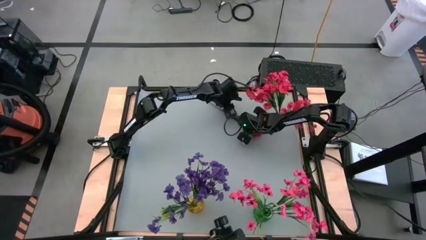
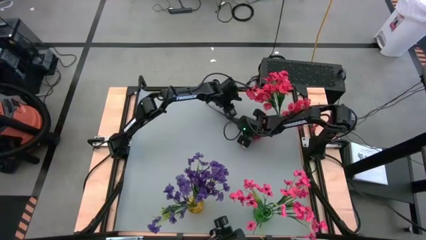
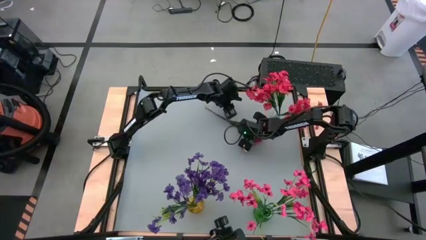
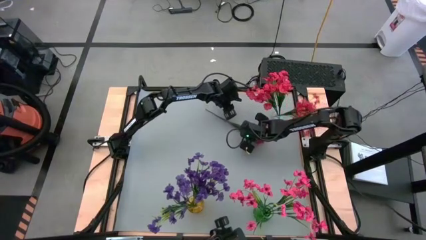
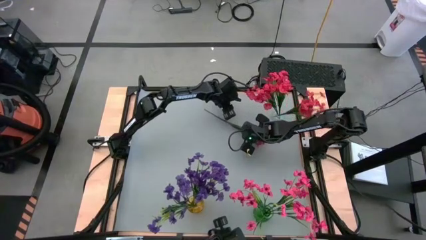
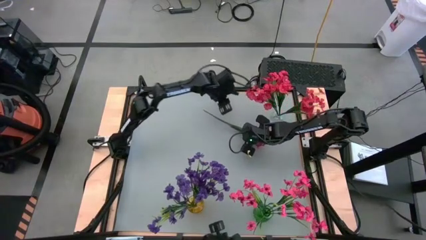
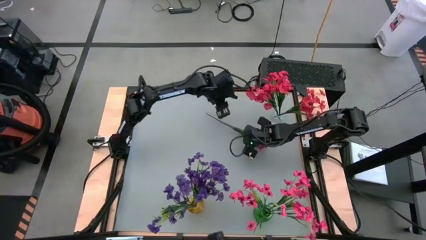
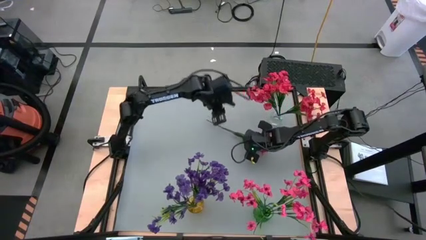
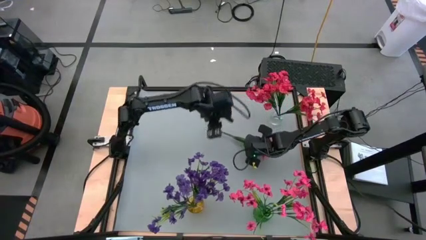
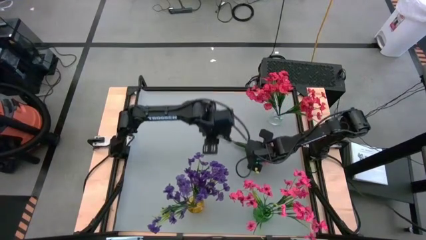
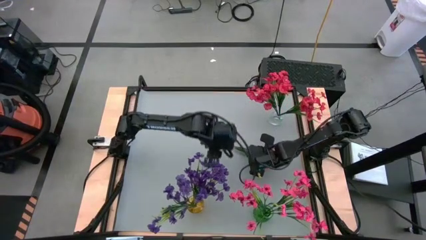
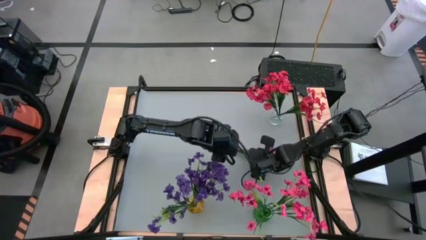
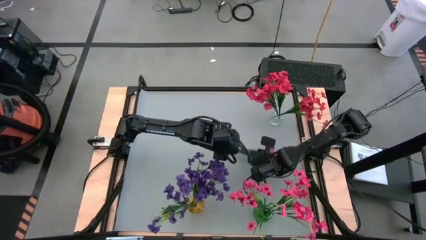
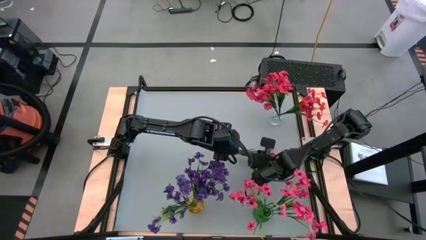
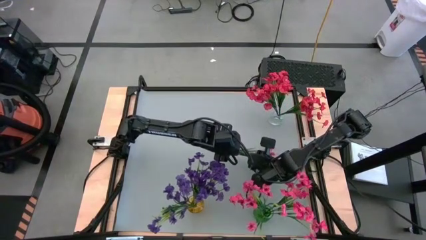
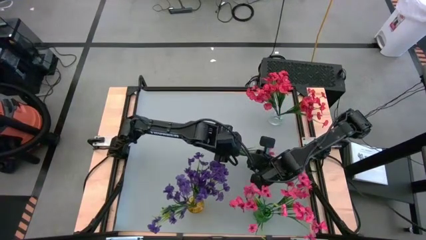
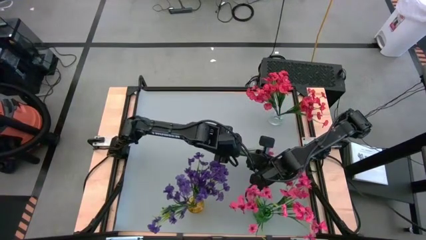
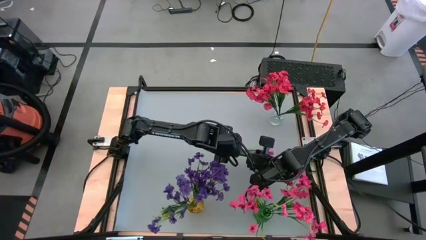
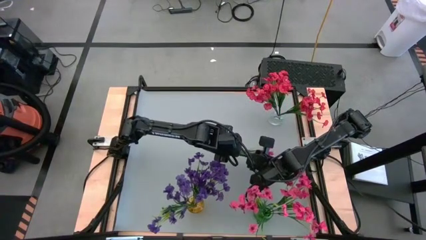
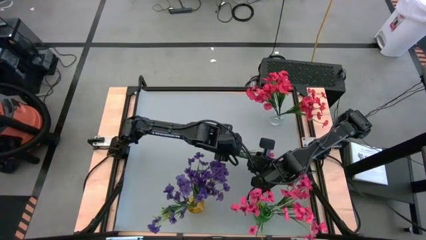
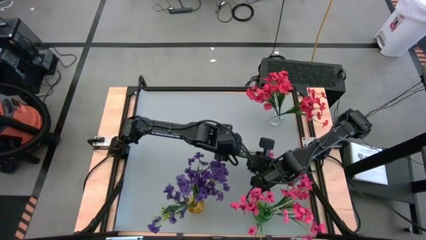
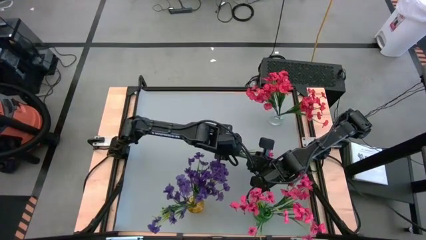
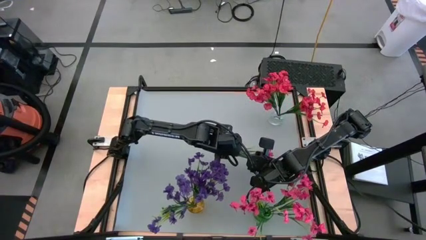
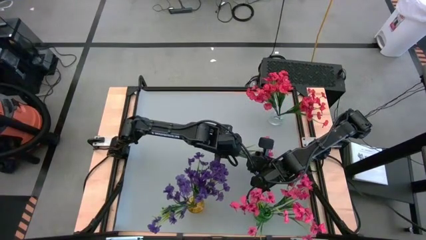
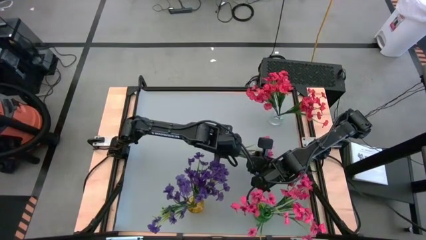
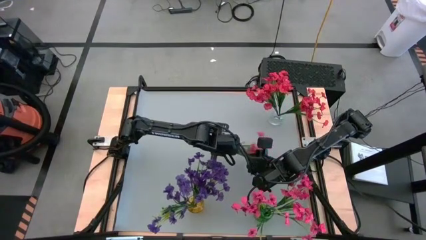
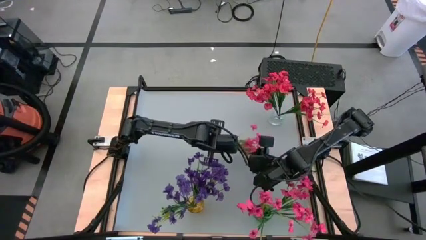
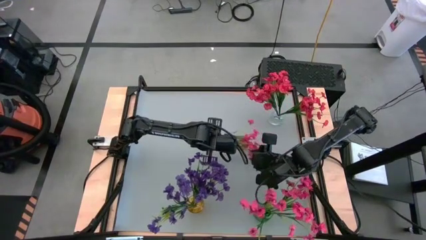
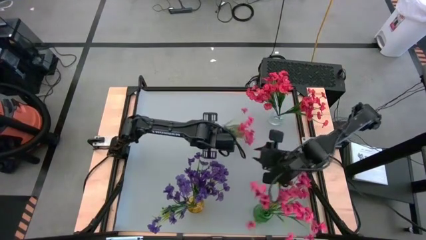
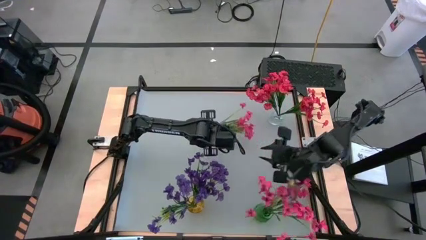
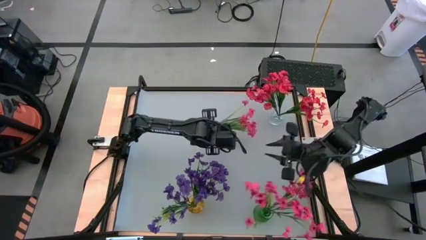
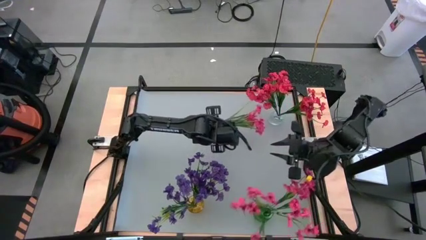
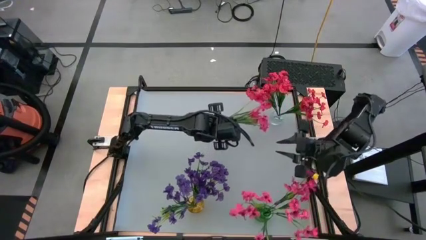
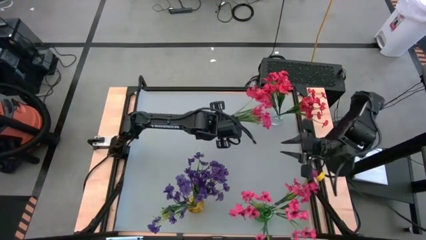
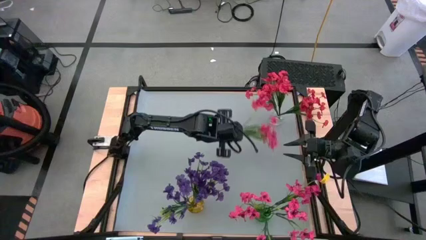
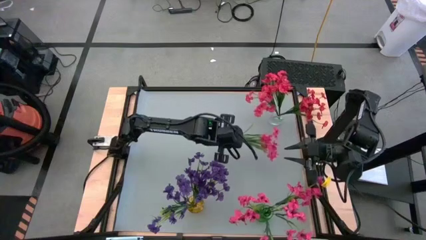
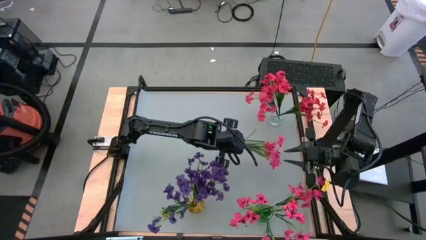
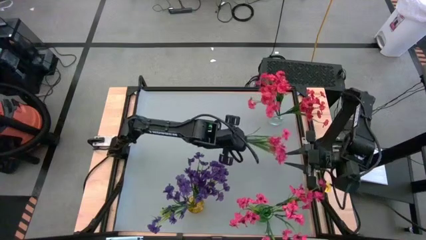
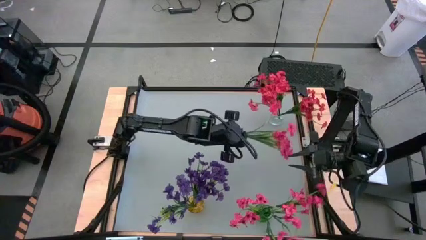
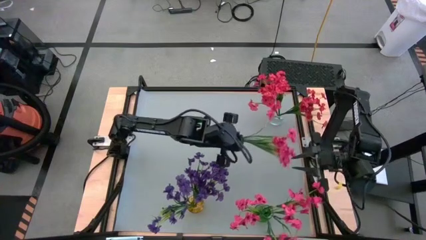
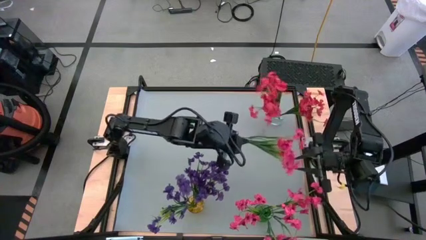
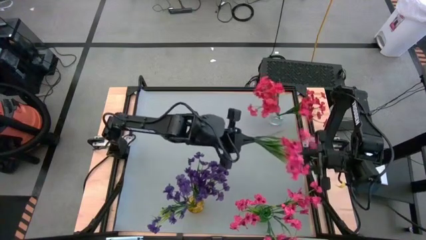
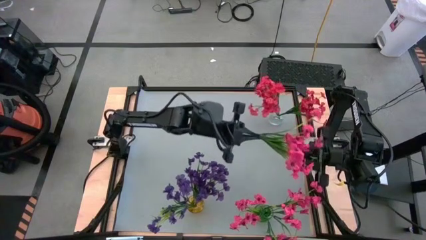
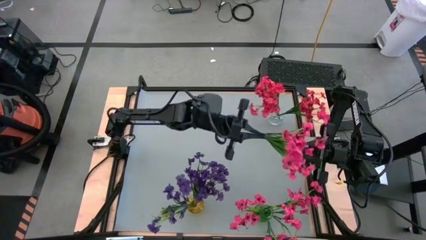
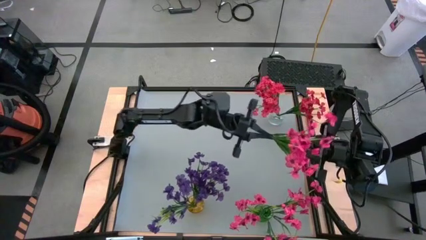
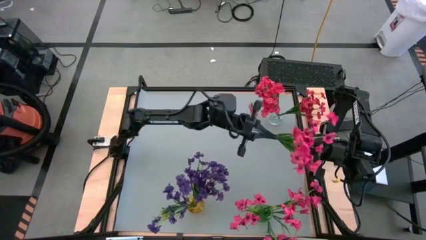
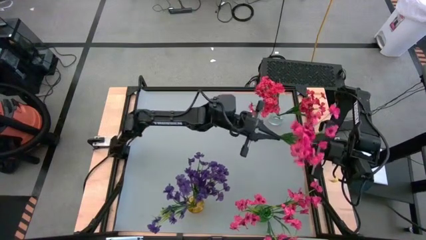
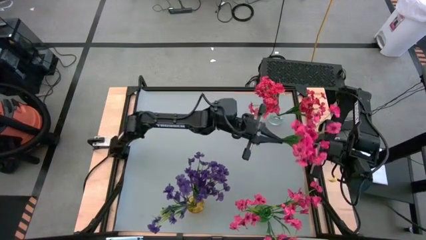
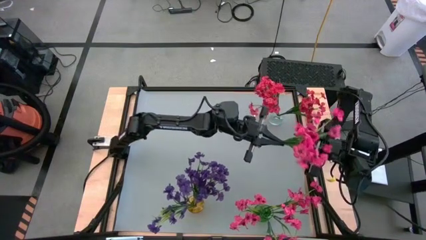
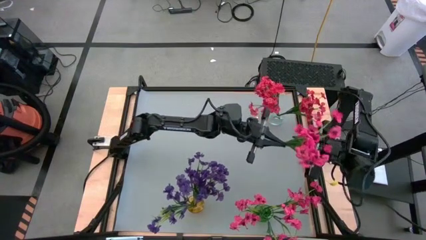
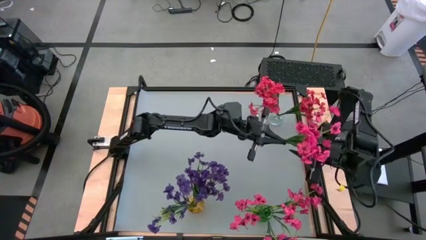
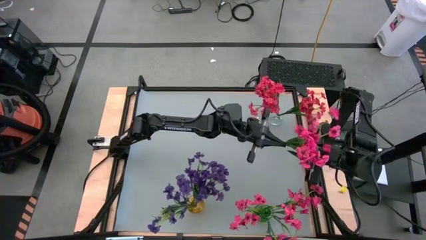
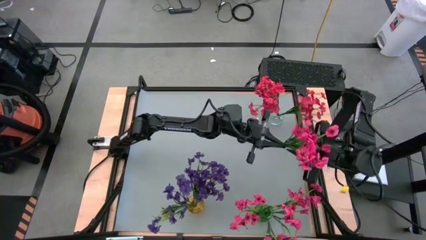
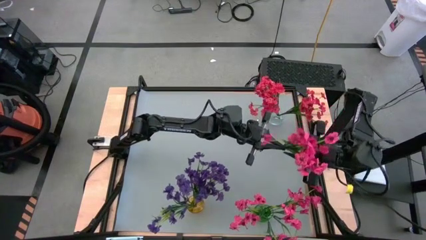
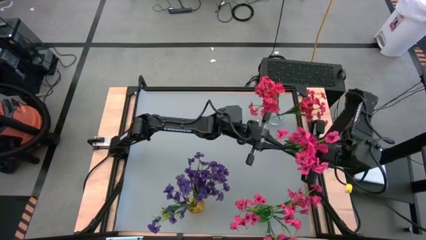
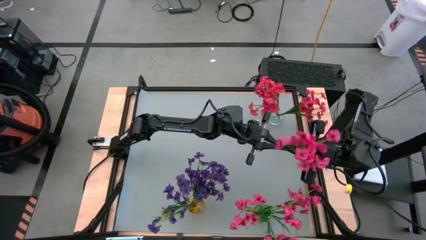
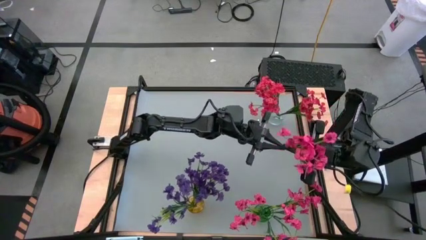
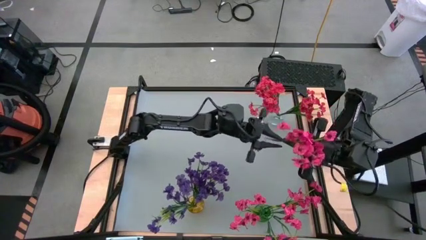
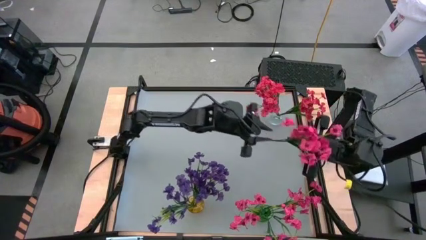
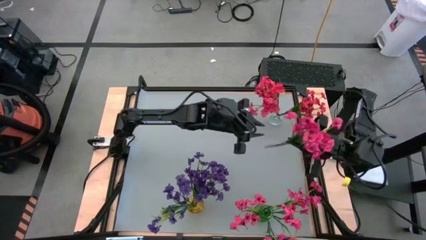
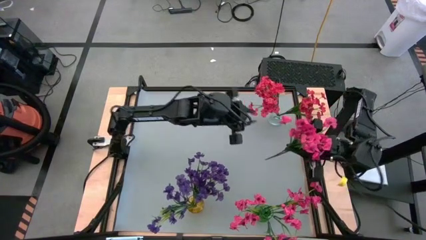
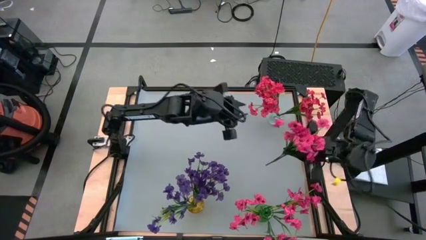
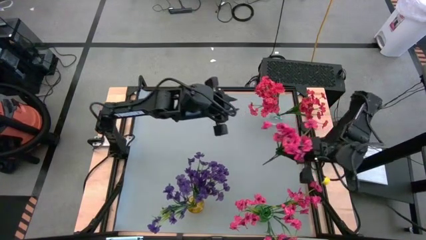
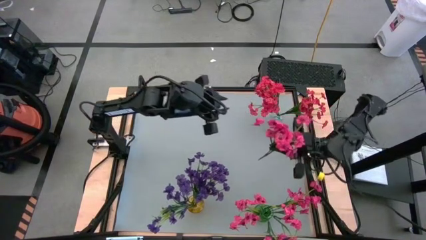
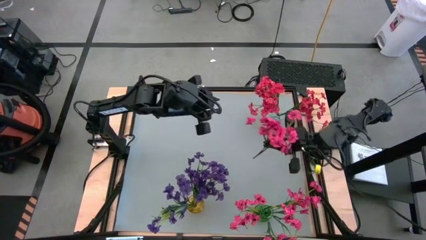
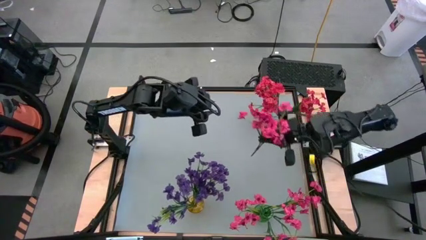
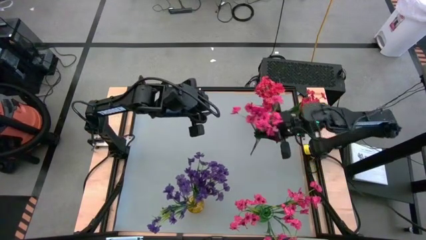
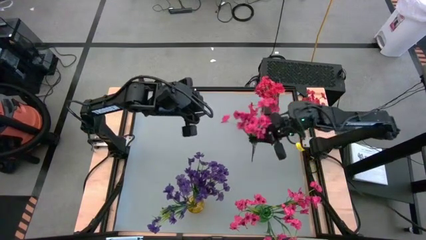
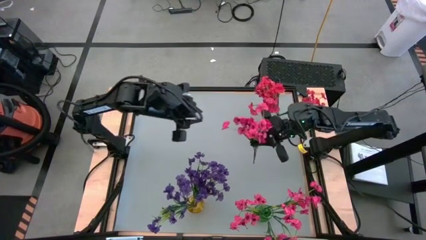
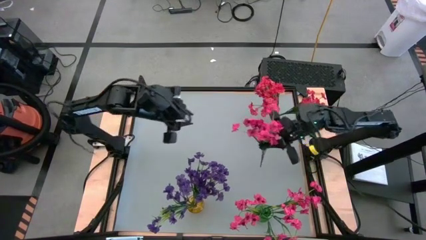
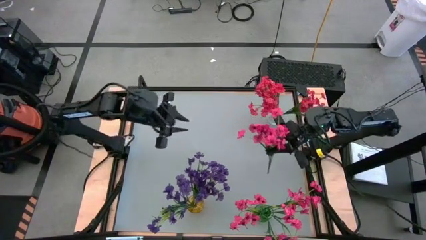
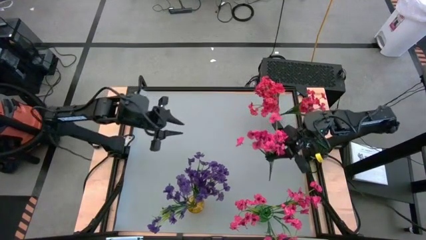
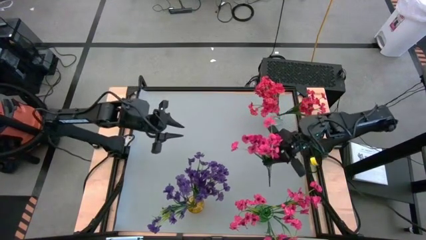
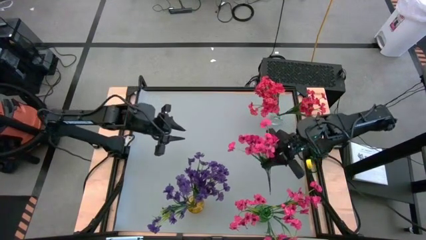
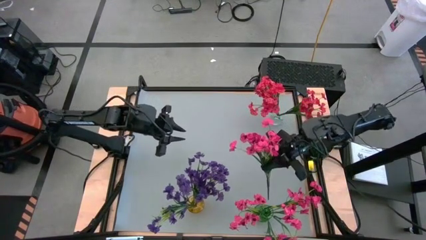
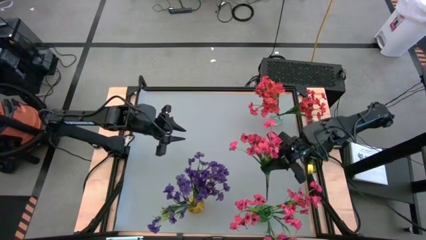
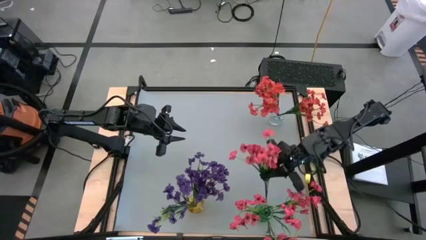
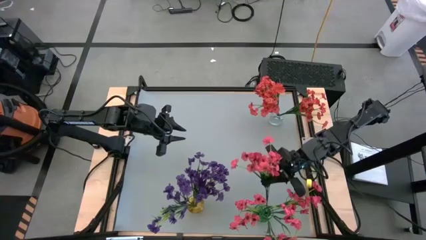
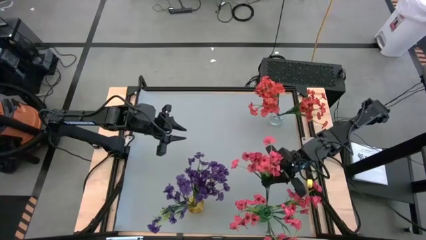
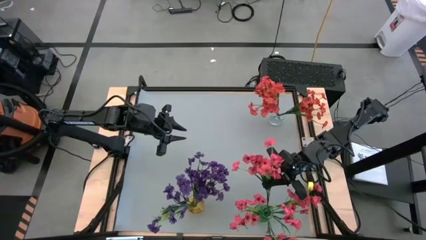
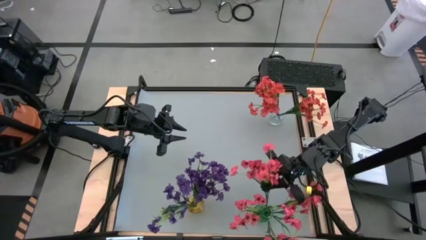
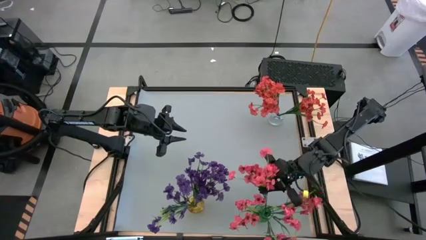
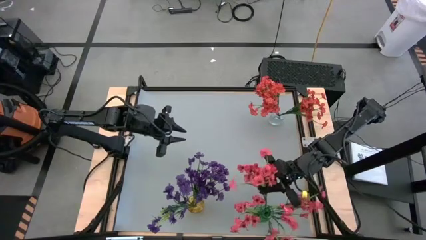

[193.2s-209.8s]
Task: Sort flowers into vase by color
Put the pink flower into the green transparent vase
